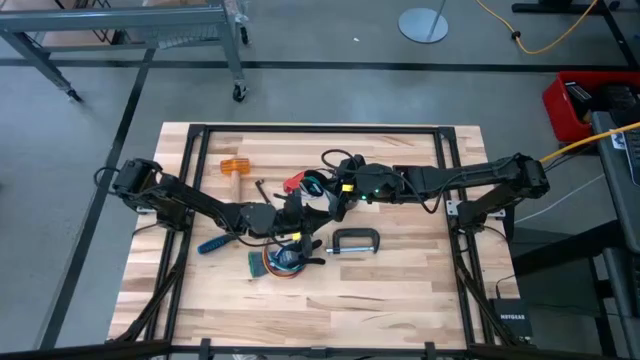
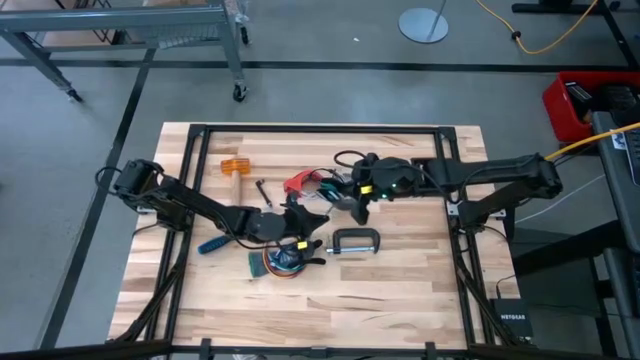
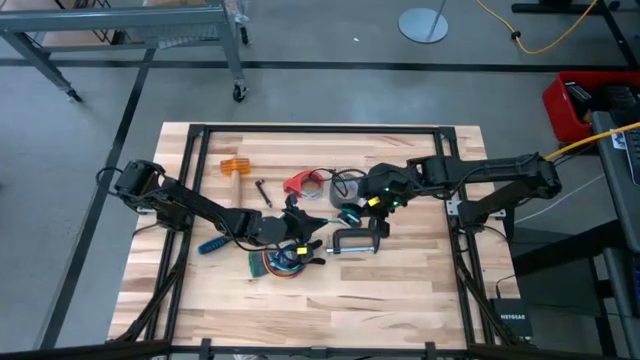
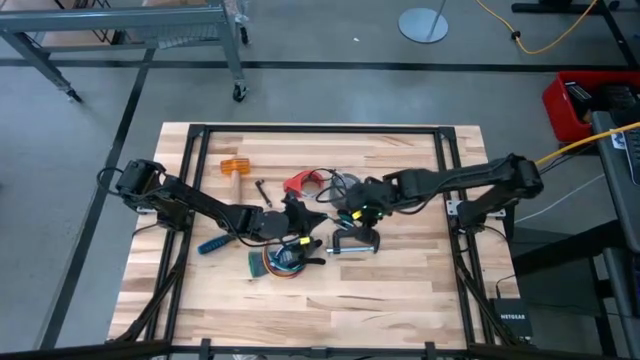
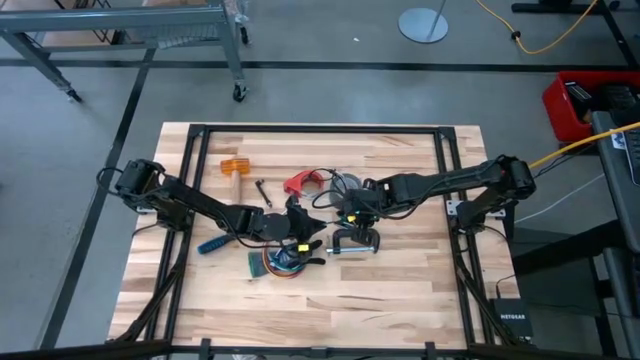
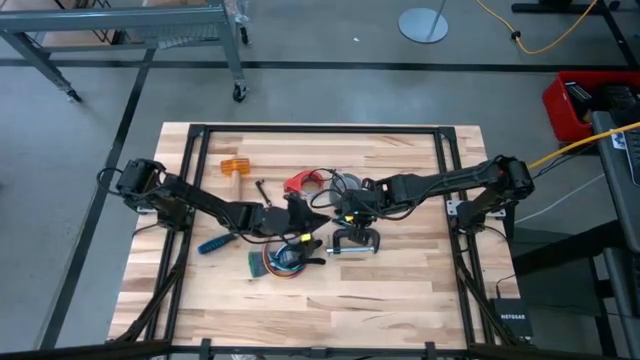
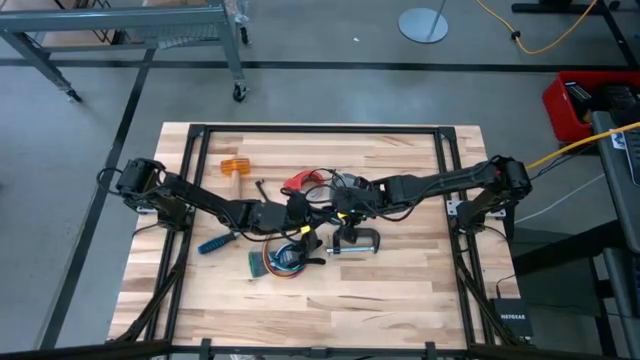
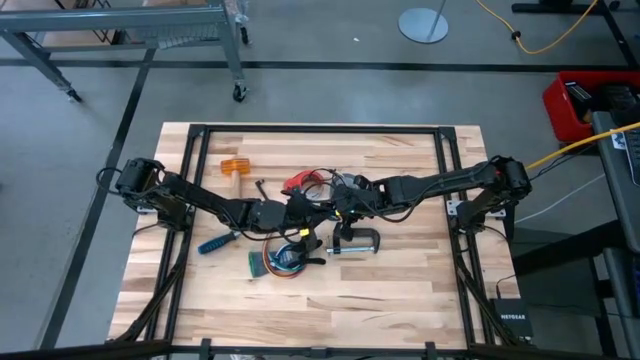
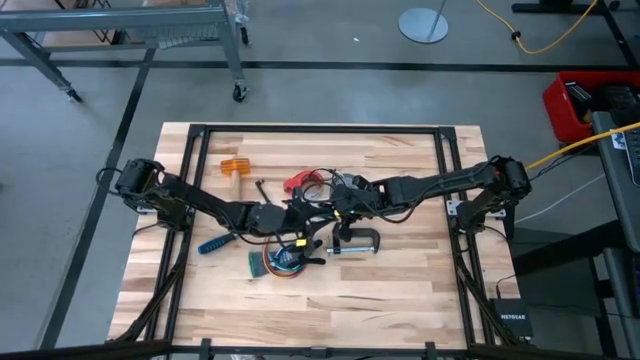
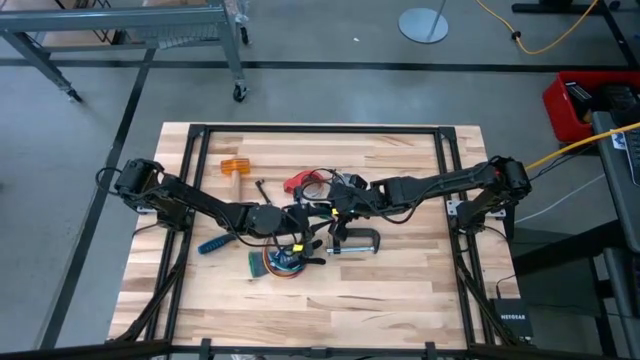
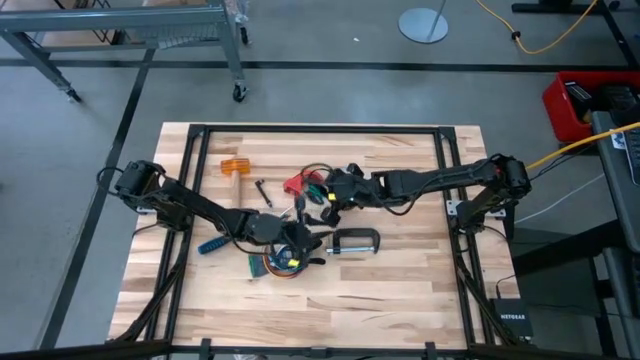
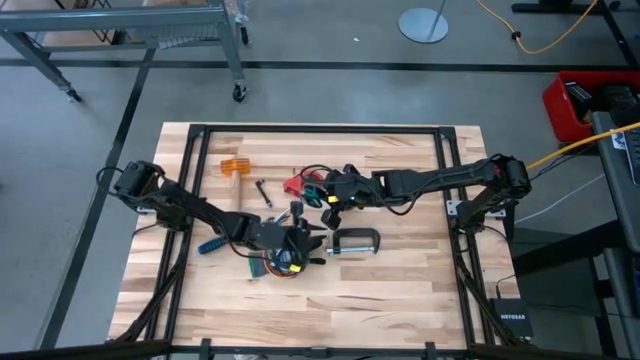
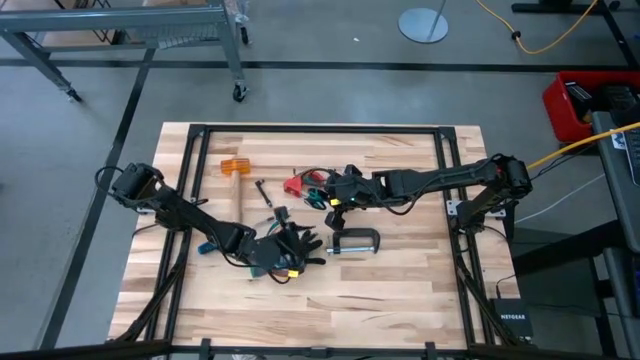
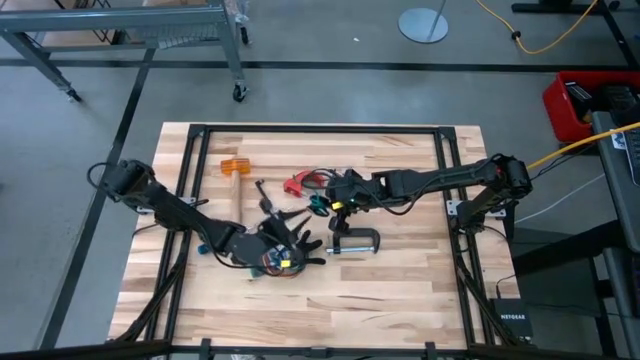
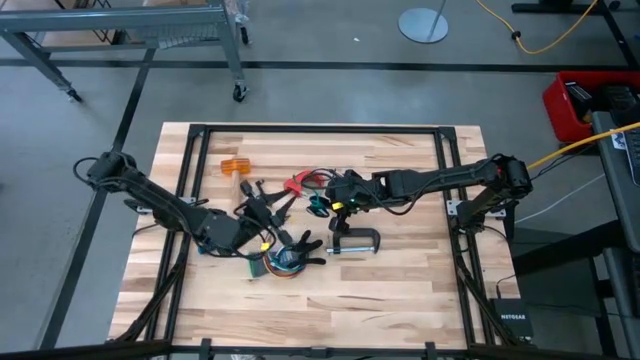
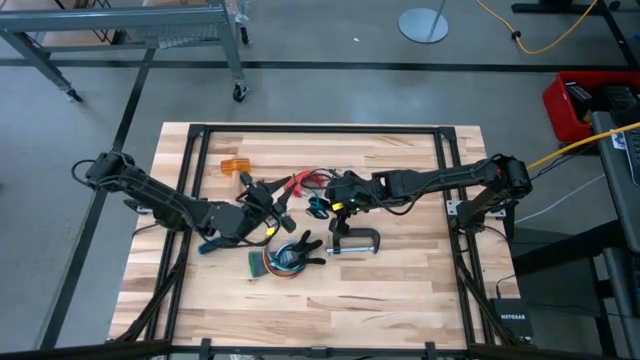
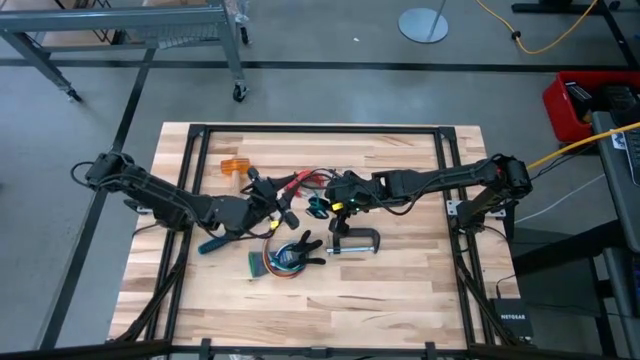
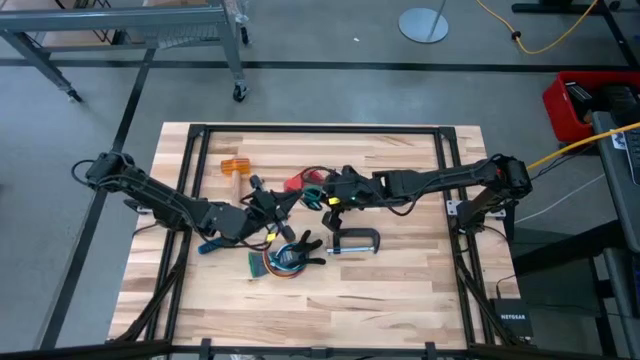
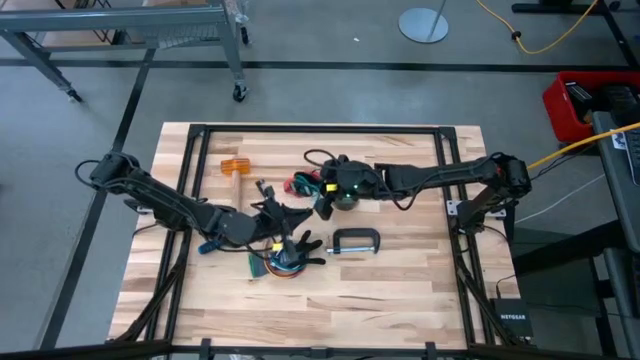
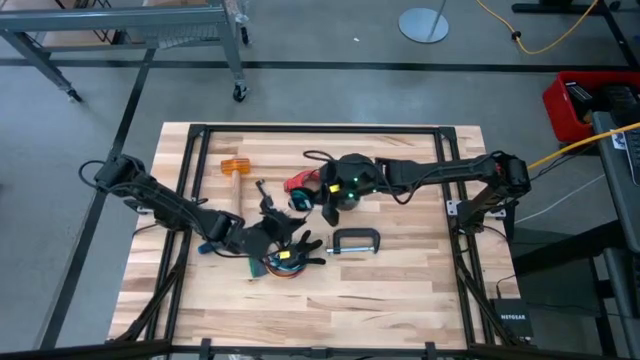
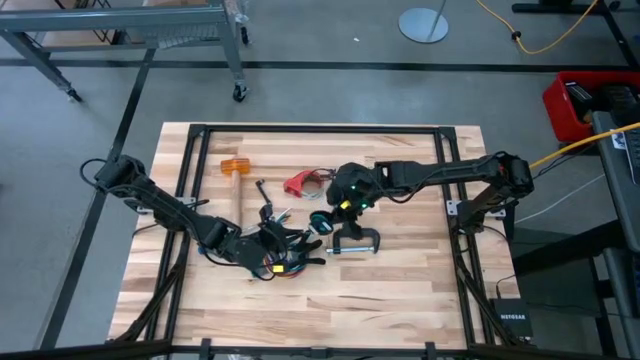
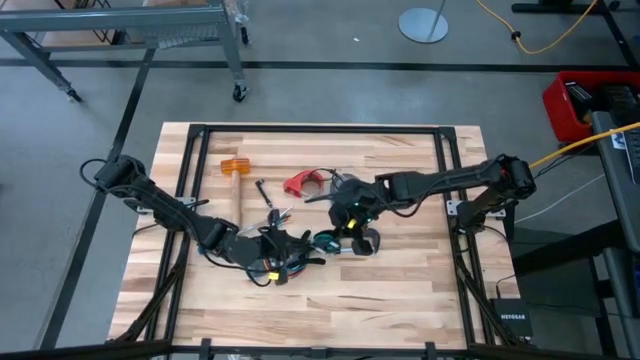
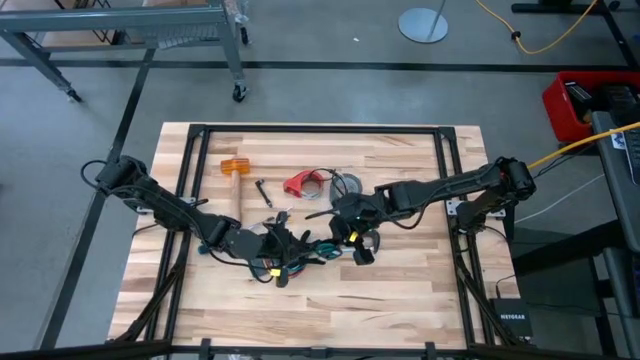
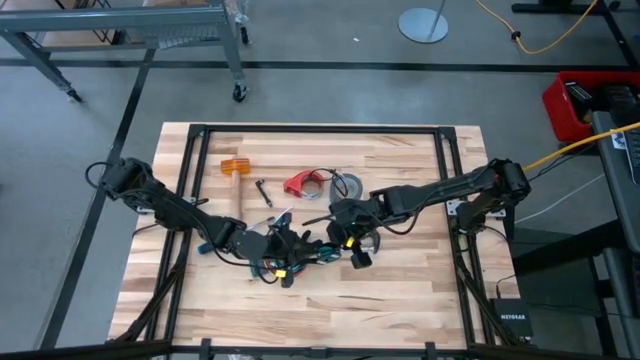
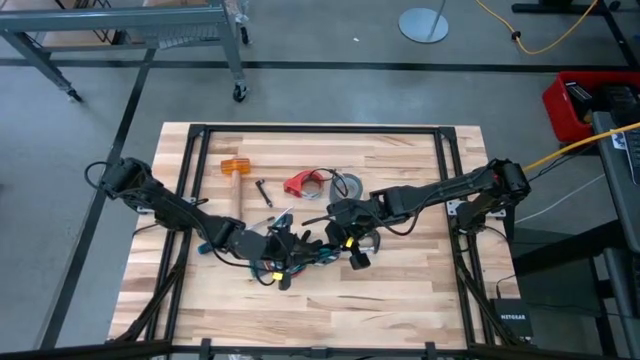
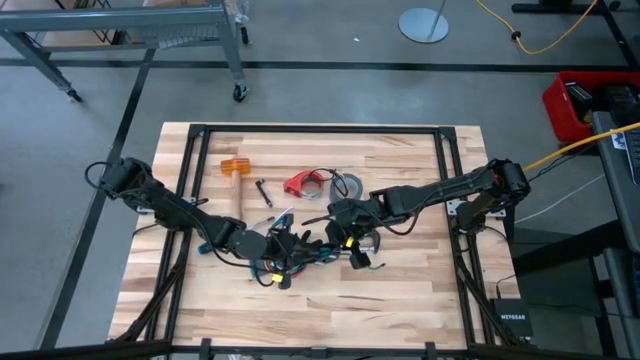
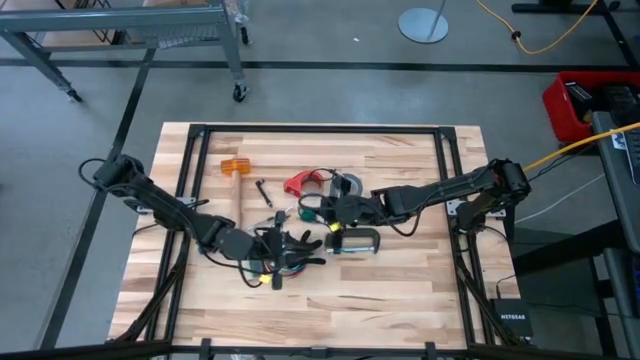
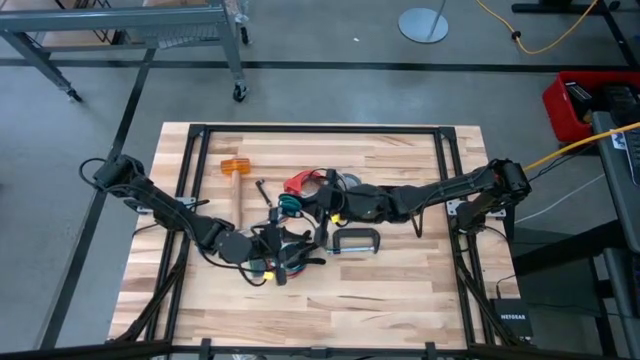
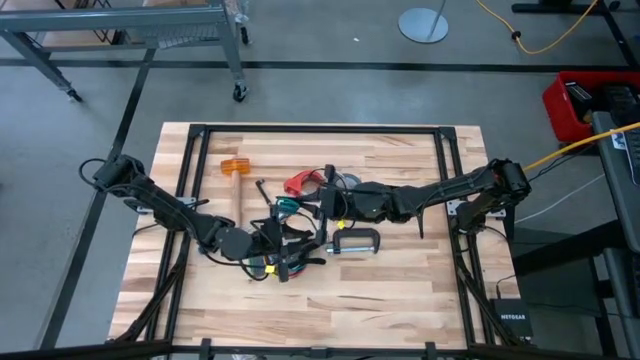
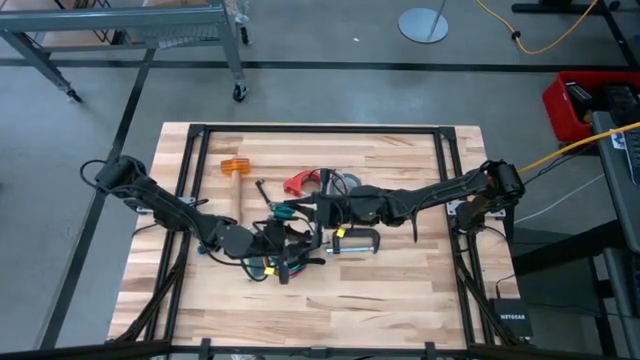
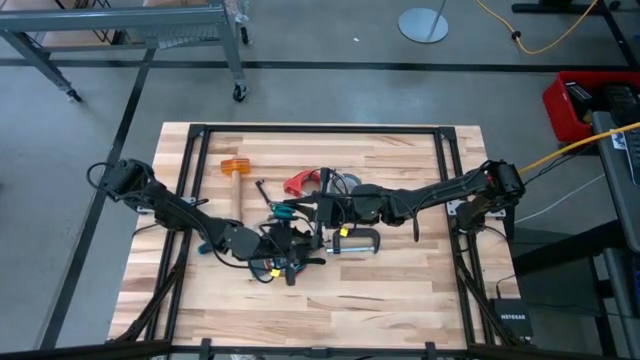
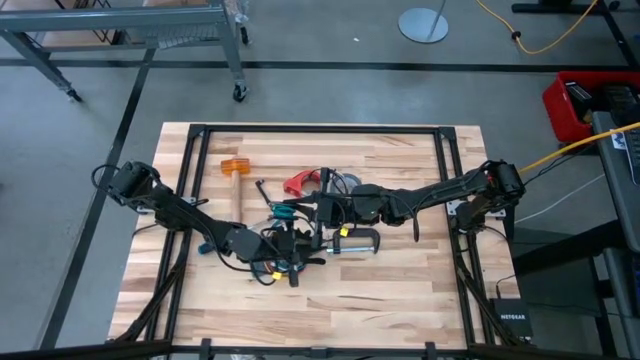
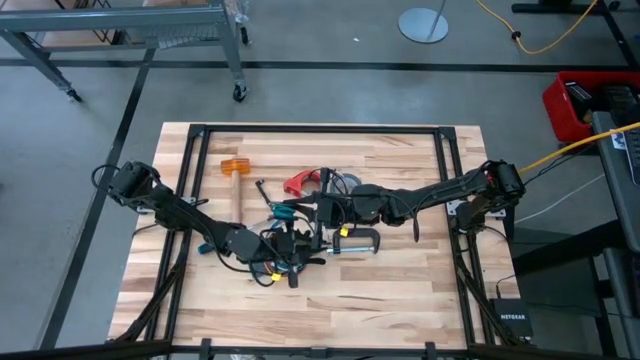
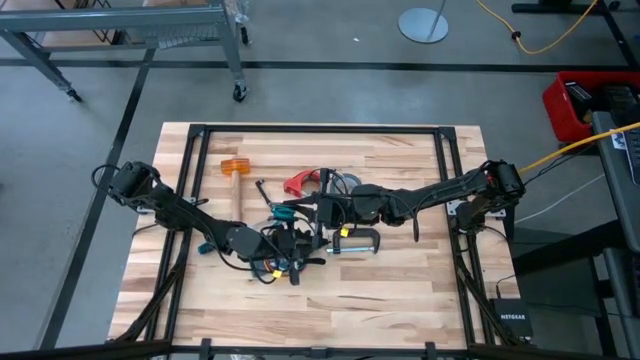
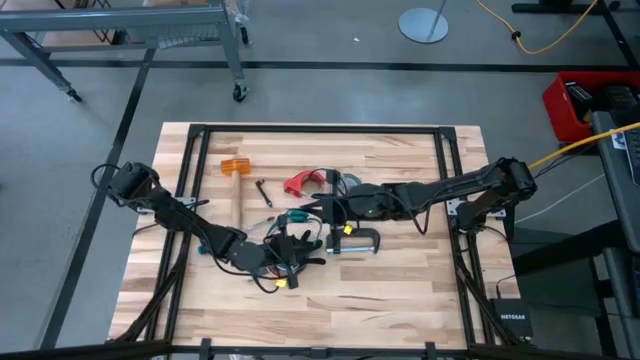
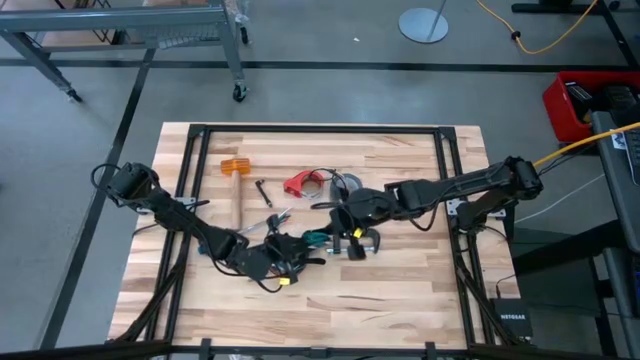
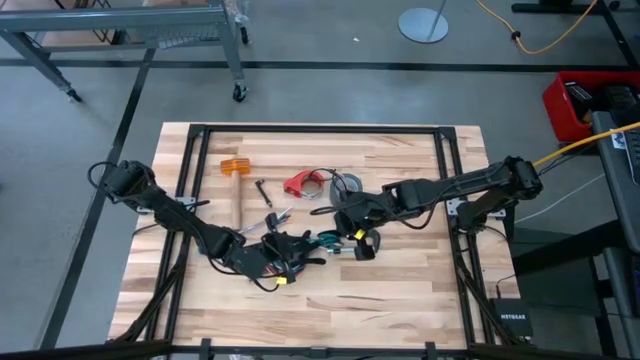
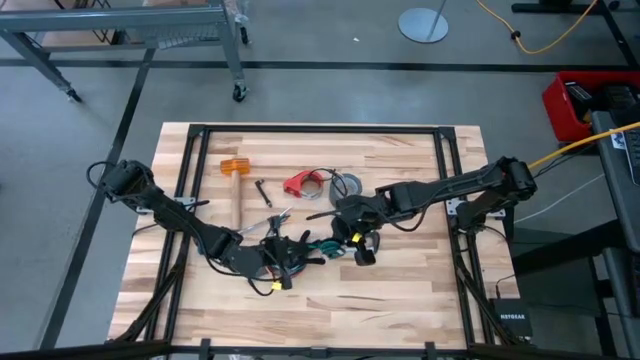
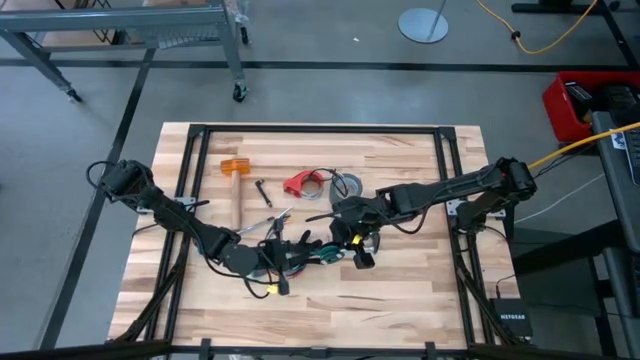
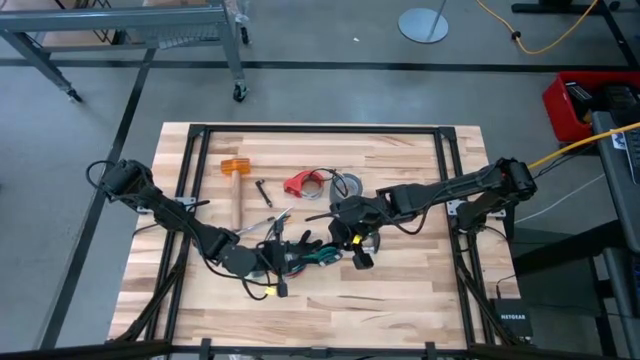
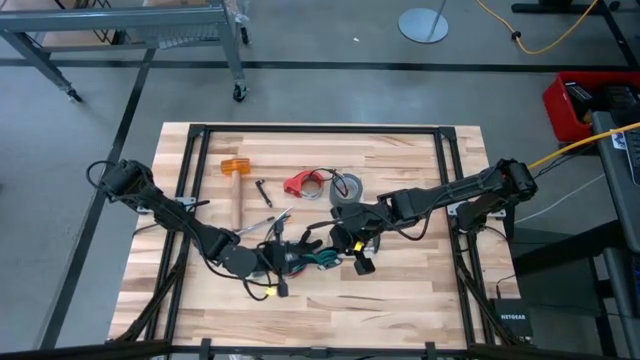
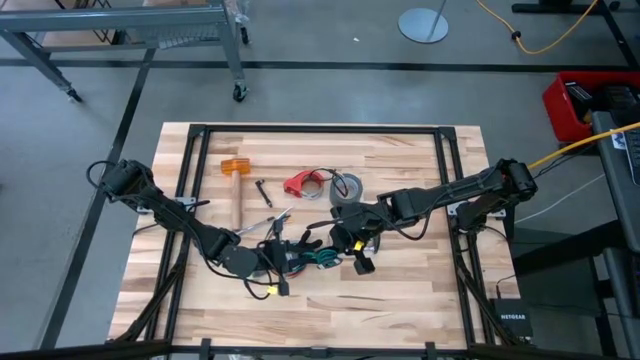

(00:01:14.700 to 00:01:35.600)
Task: Coil cords
Coil the blue wire onto the spool
